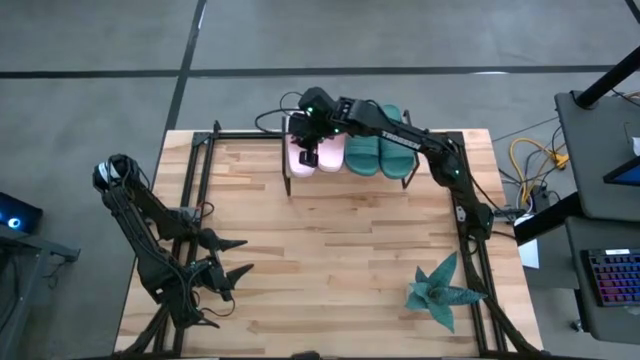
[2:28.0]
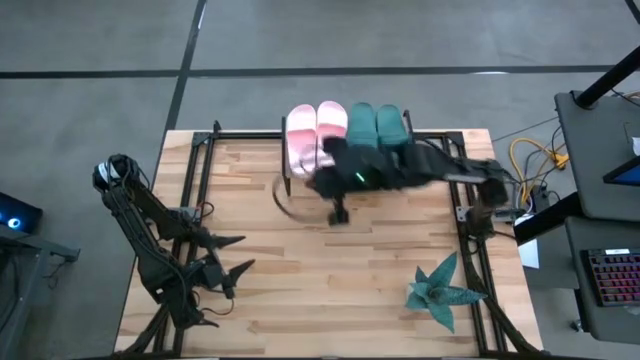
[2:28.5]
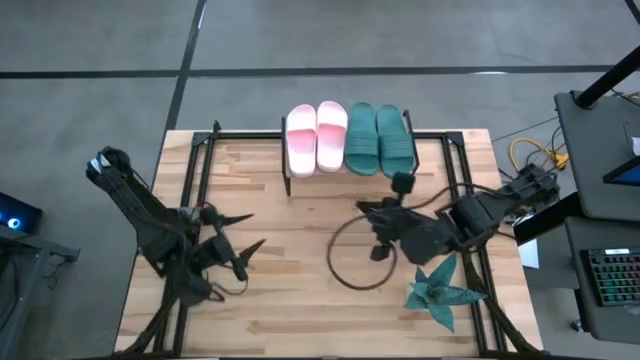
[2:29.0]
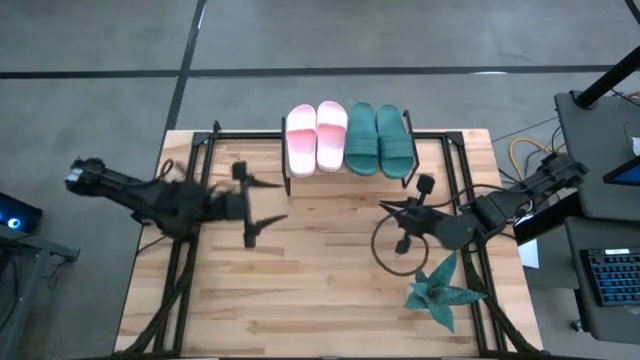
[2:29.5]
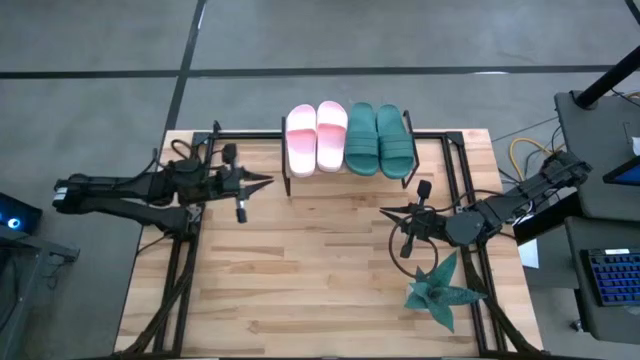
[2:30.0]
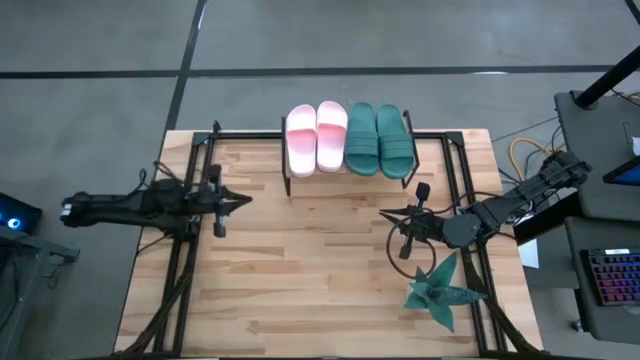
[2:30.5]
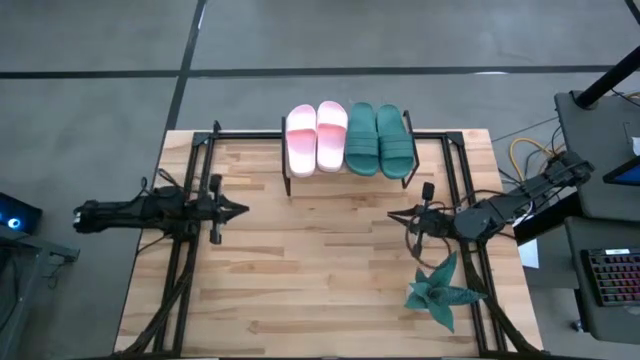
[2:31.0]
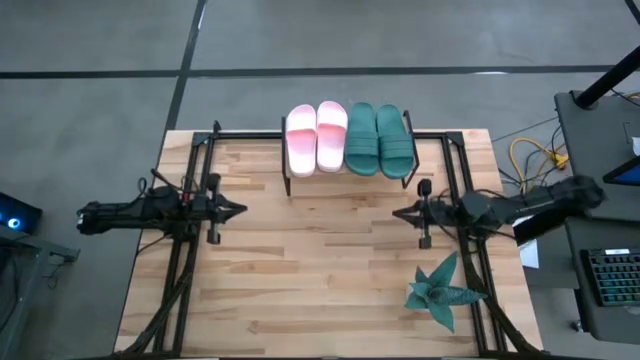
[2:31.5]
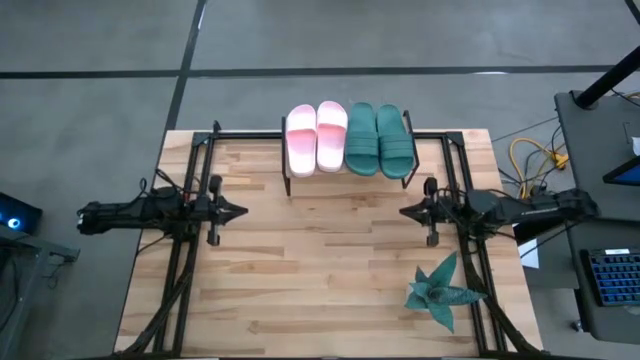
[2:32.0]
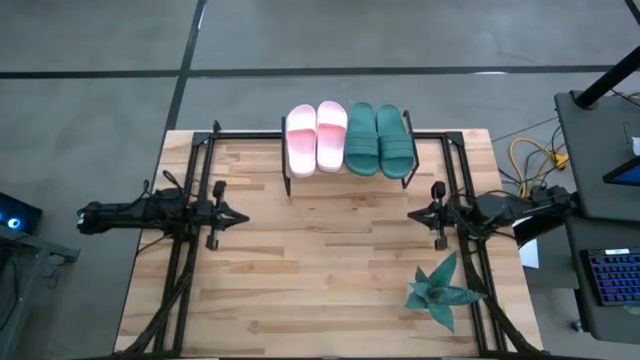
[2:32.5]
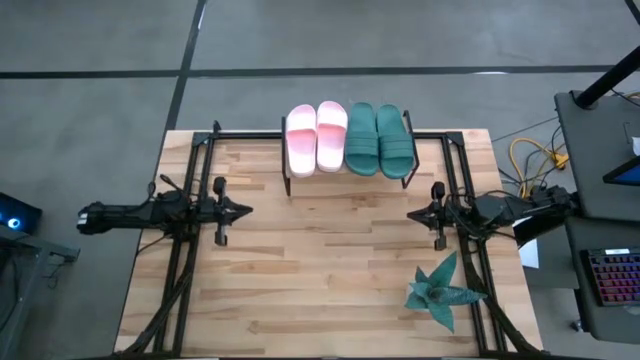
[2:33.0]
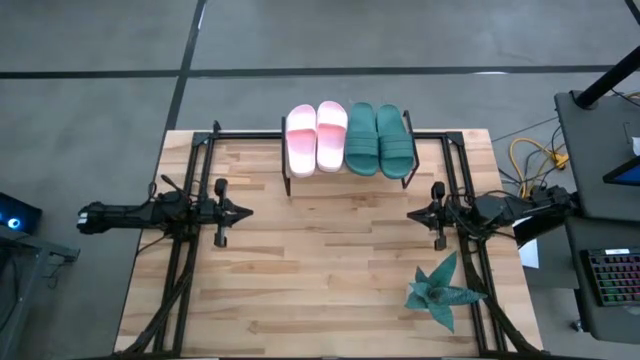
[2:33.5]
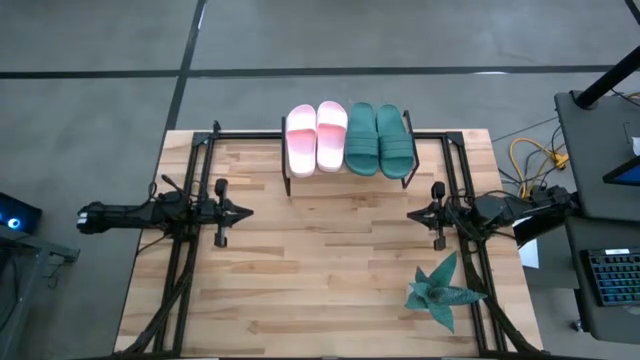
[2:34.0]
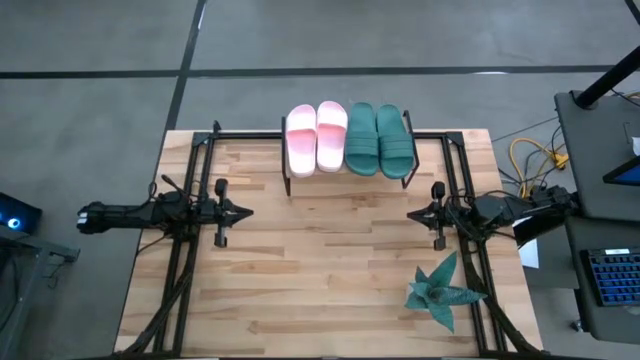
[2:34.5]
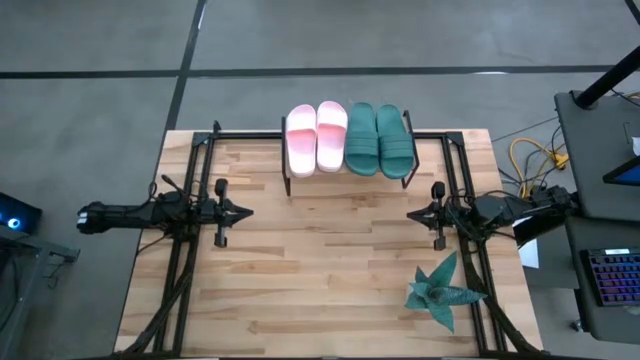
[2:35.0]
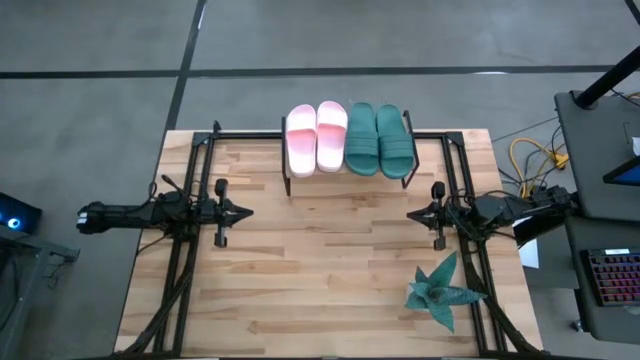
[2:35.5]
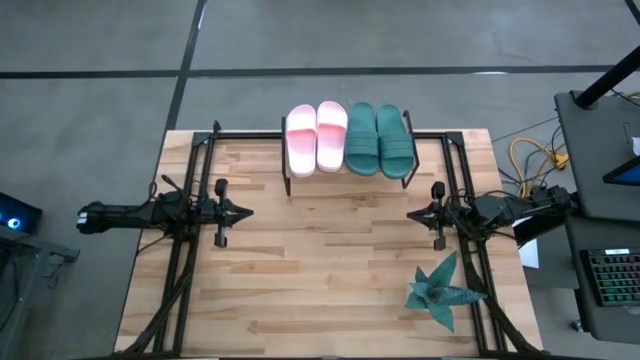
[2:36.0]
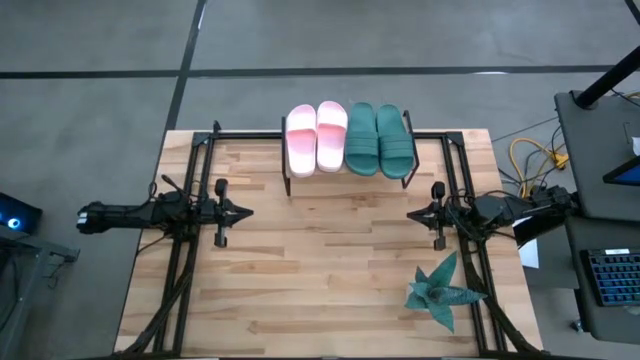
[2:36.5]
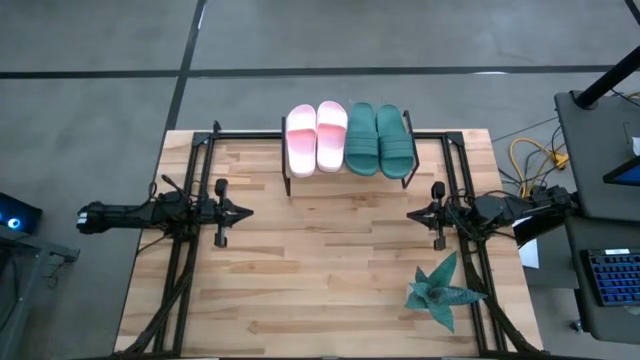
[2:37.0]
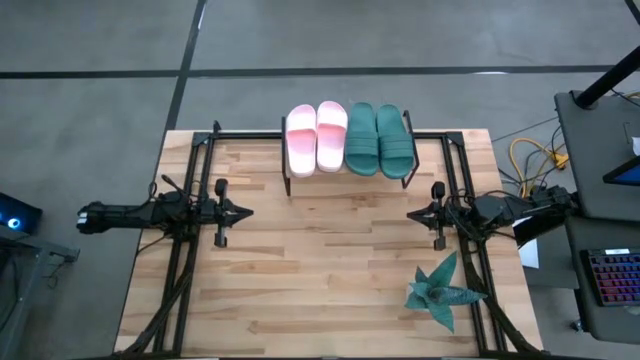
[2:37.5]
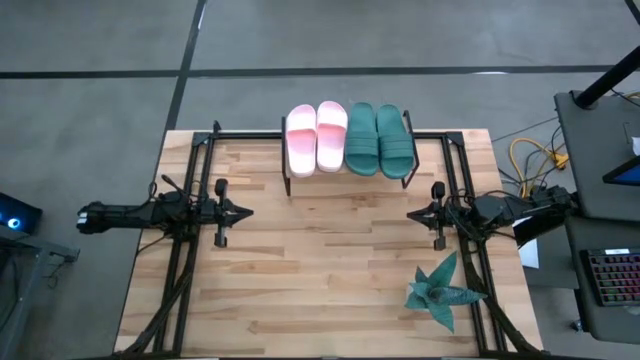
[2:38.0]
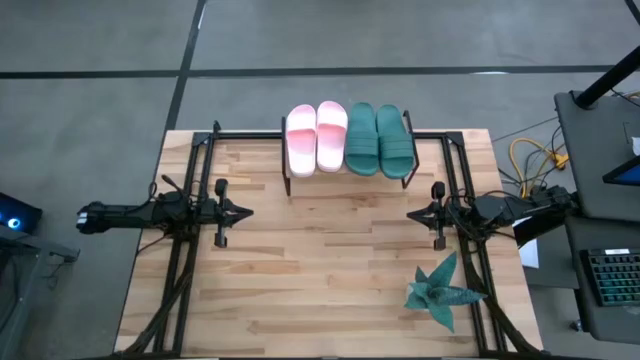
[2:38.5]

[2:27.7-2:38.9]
Task: Pick and place slides into the shelf
Return to Home Position

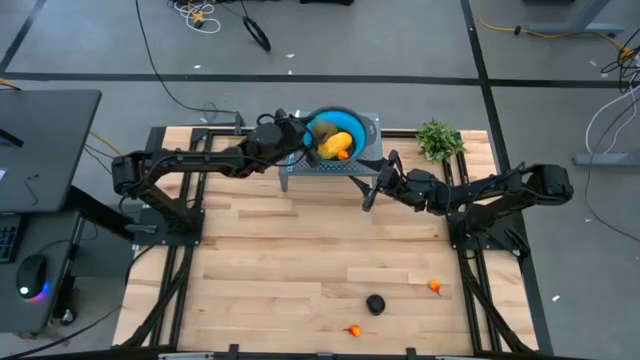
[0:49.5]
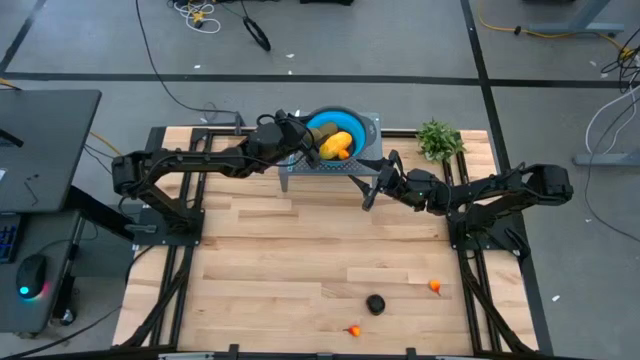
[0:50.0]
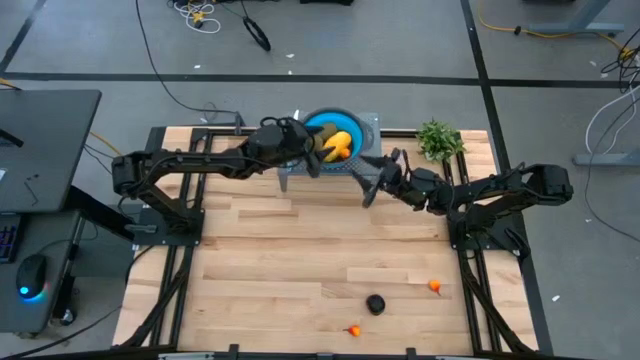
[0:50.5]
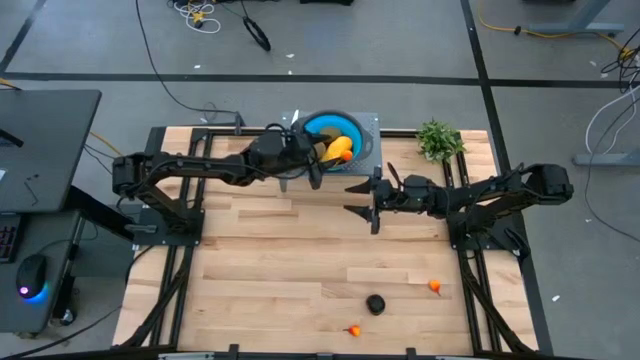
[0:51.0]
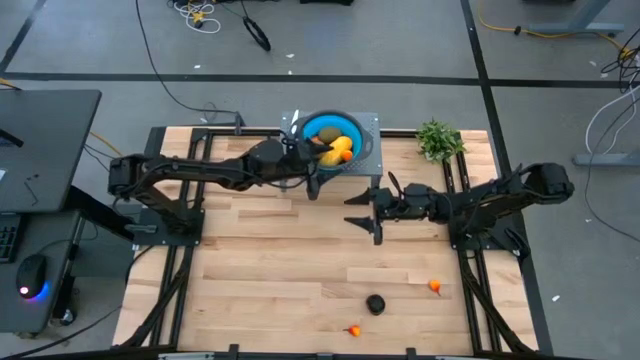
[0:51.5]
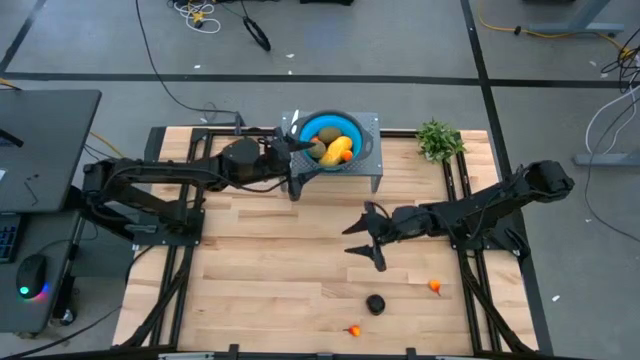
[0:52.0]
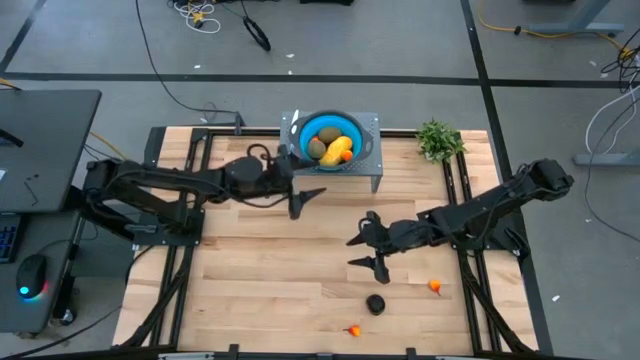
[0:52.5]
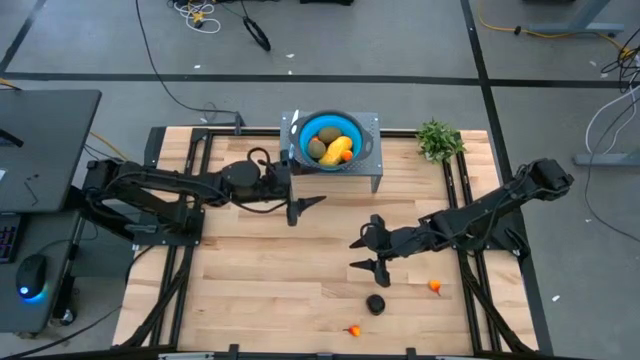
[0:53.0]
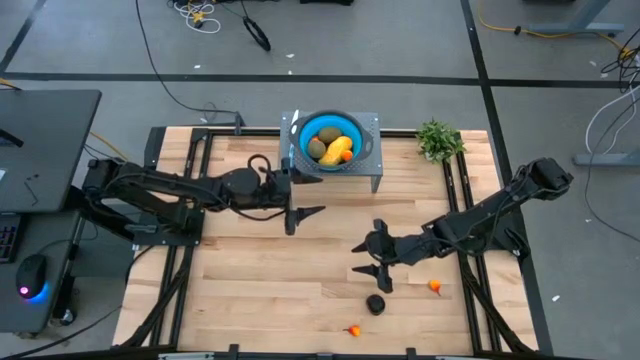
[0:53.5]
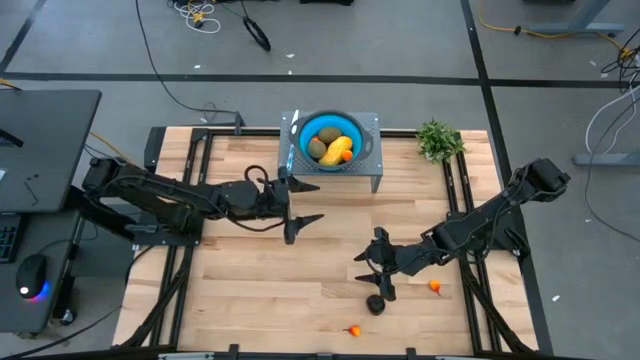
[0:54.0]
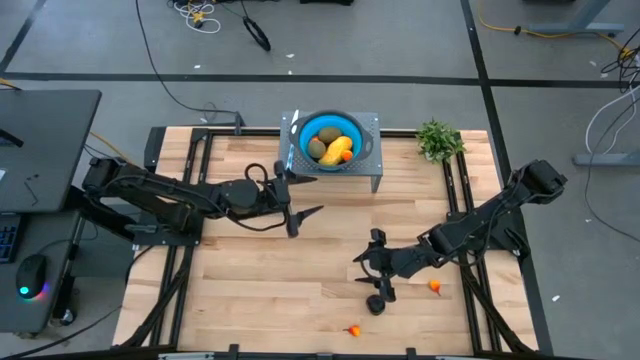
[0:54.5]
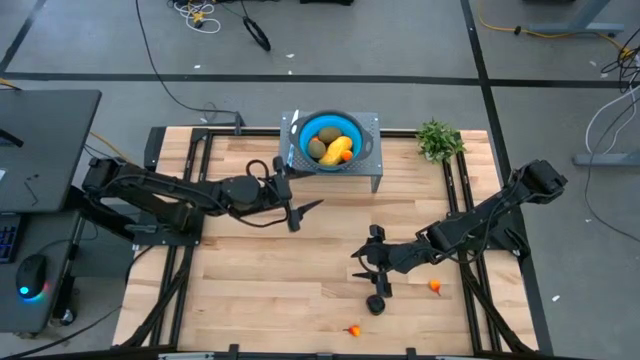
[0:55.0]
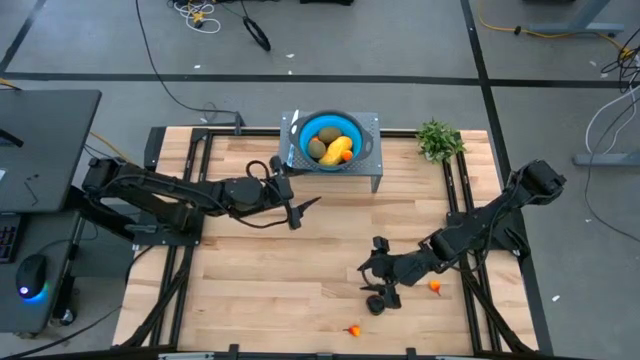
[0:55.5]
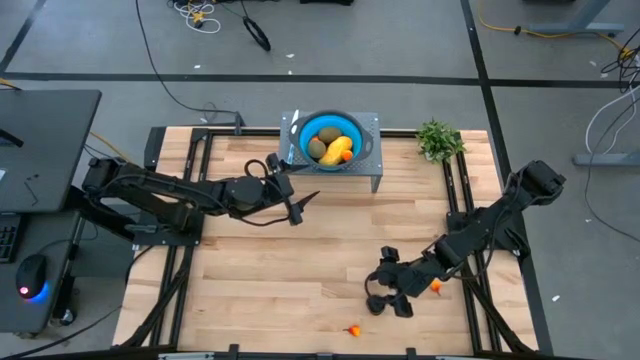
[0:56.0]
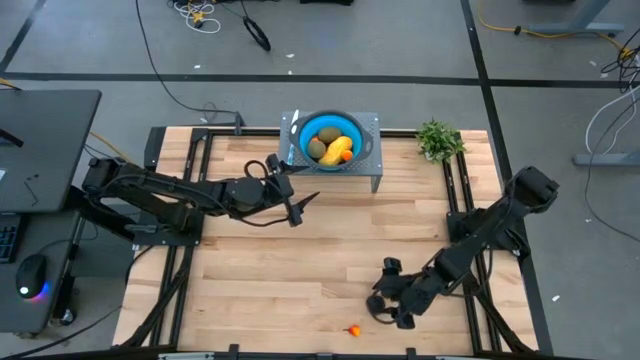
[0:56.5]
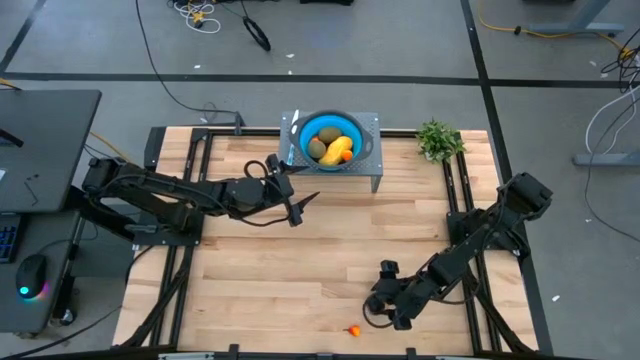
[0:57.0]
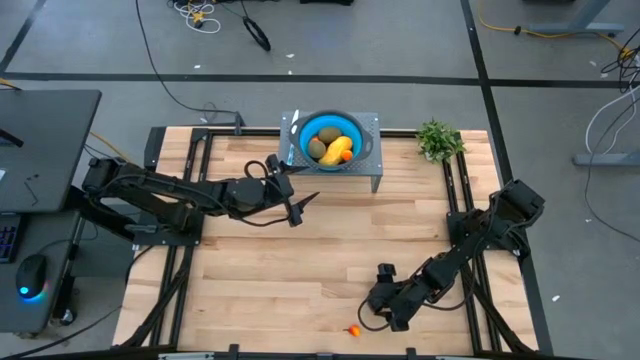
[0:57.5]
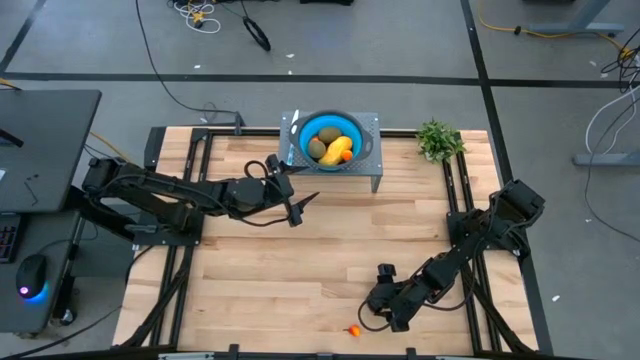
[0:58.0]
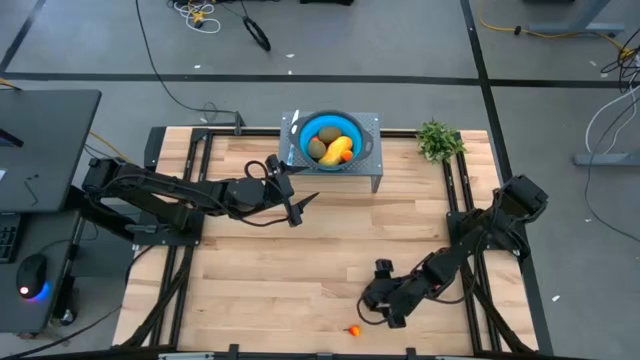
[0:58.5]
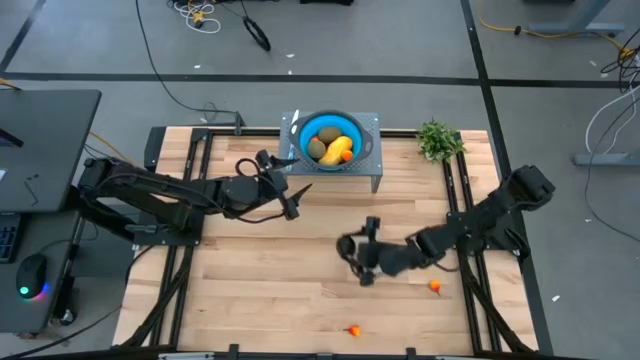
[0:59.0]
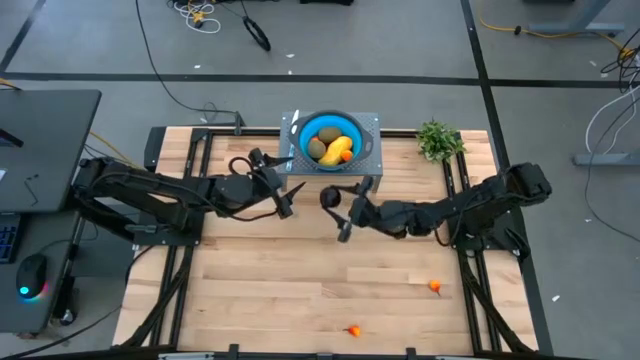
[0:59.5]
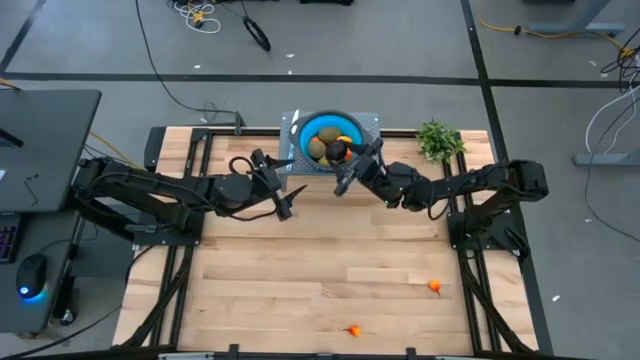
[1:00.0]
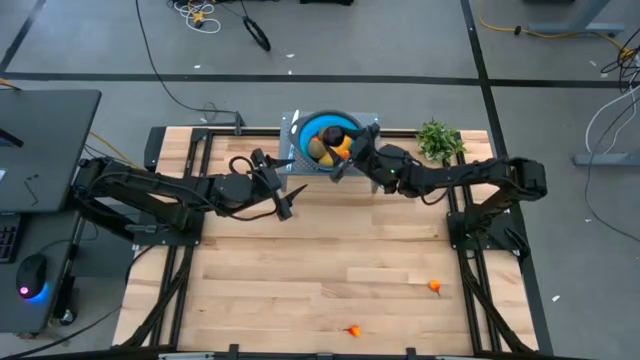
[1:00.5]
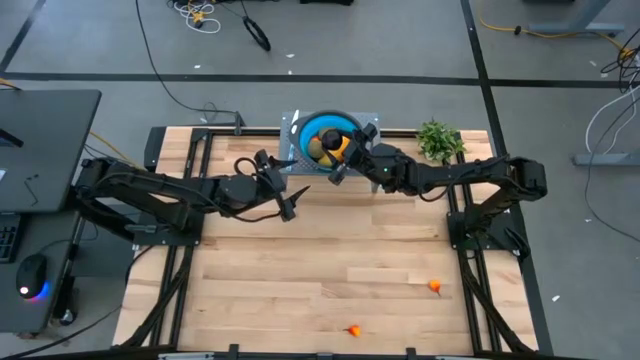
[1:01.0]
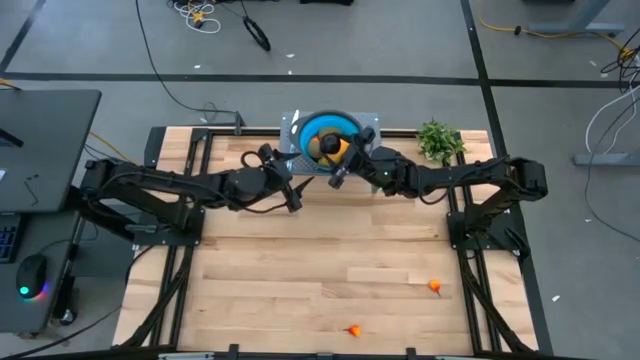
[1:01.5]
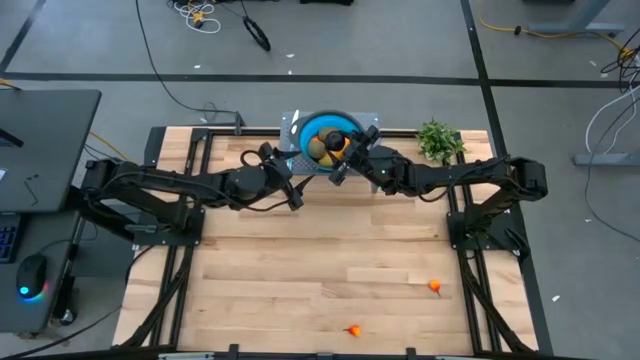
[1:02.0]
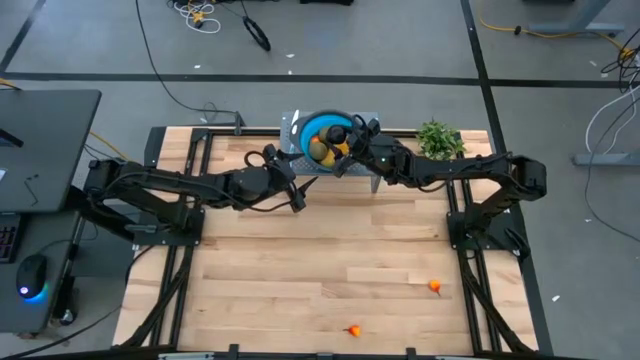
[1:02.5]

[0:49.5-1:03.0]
Task: Pick & Place Fruit
Put the black plum into the blue strainer bowl
